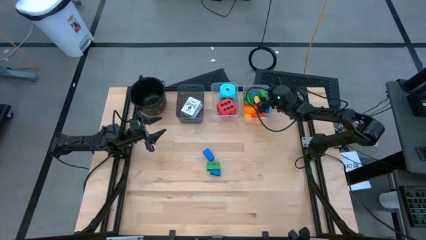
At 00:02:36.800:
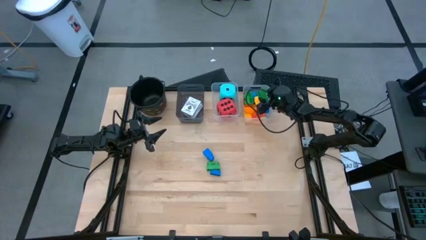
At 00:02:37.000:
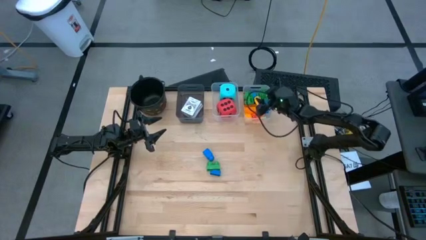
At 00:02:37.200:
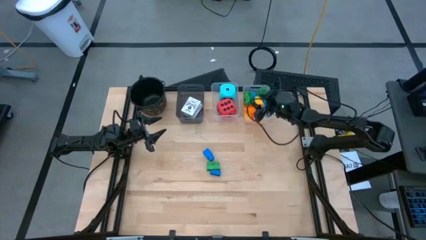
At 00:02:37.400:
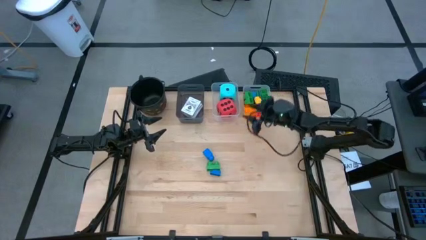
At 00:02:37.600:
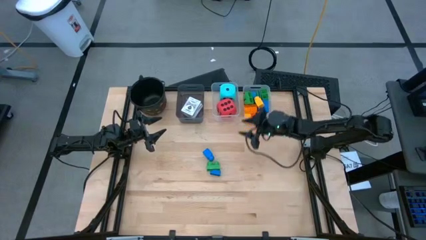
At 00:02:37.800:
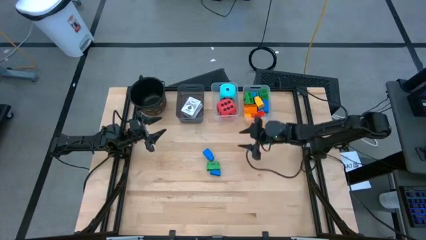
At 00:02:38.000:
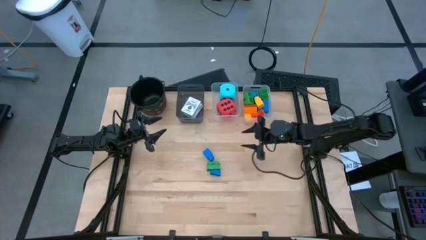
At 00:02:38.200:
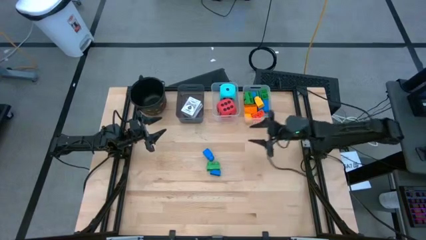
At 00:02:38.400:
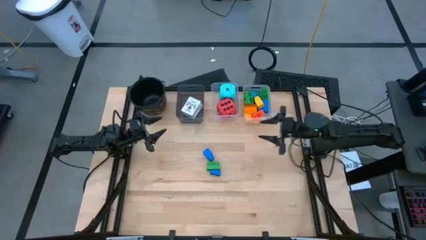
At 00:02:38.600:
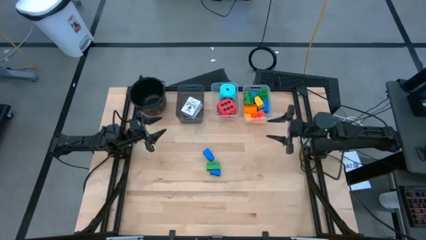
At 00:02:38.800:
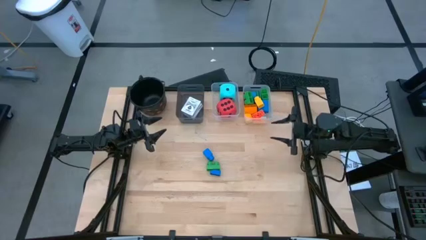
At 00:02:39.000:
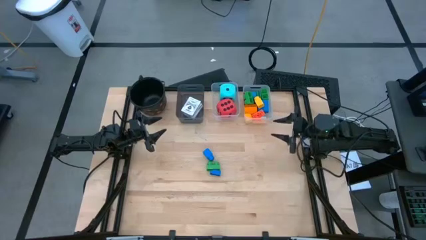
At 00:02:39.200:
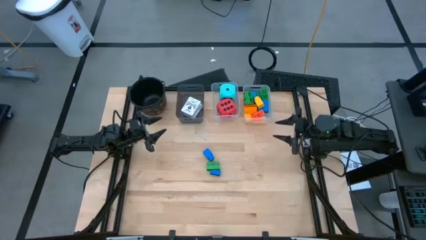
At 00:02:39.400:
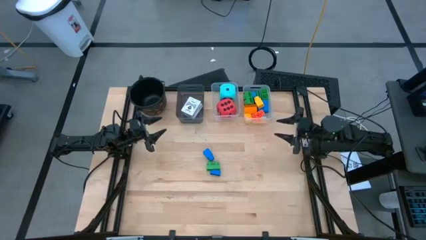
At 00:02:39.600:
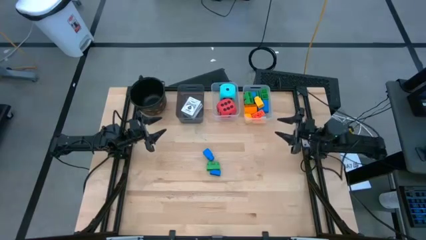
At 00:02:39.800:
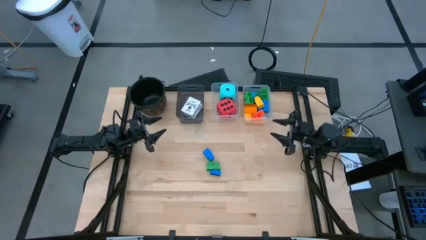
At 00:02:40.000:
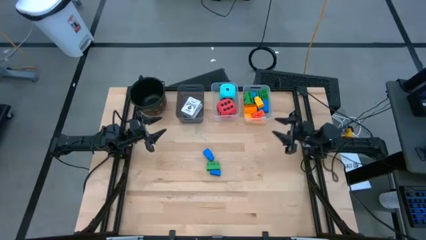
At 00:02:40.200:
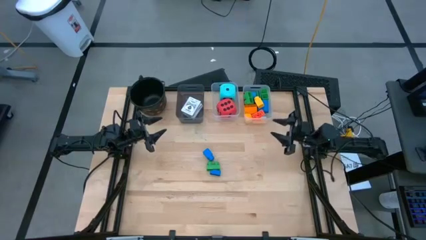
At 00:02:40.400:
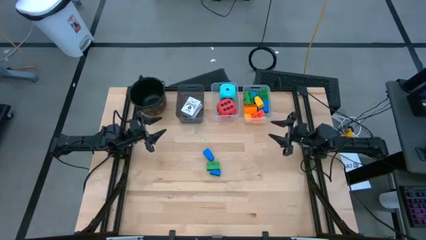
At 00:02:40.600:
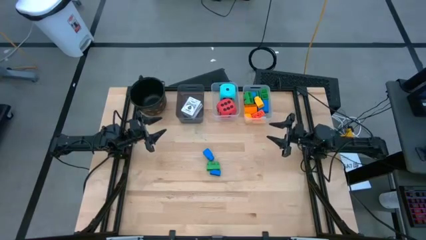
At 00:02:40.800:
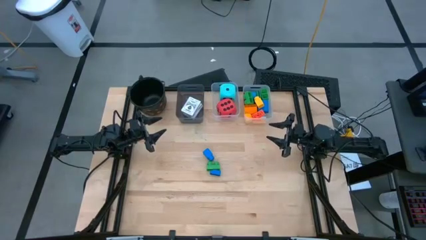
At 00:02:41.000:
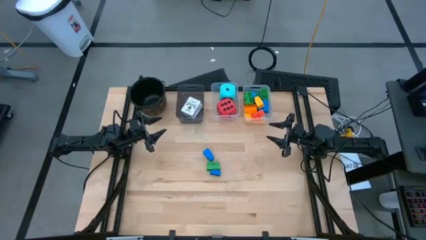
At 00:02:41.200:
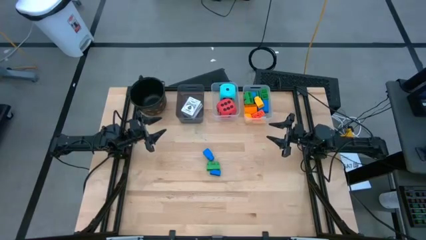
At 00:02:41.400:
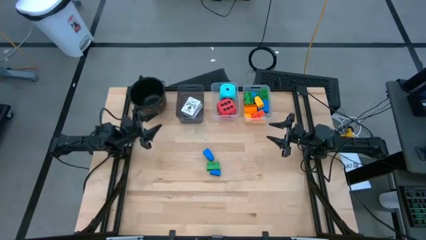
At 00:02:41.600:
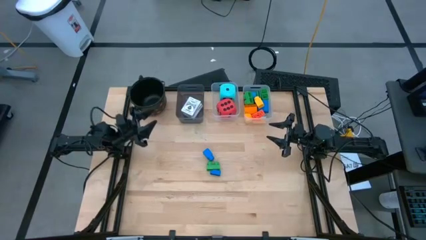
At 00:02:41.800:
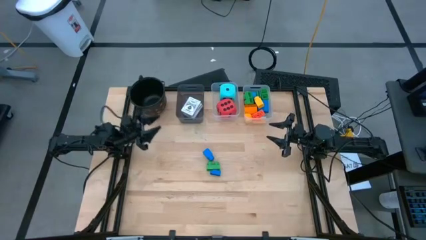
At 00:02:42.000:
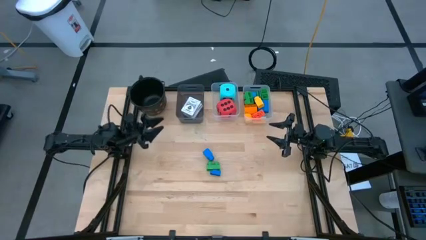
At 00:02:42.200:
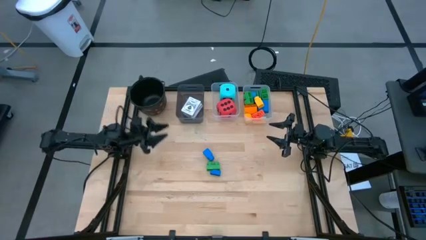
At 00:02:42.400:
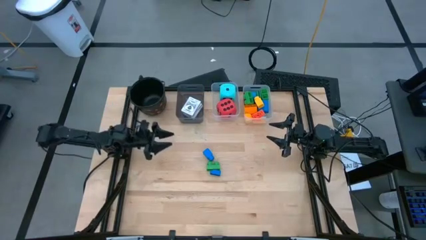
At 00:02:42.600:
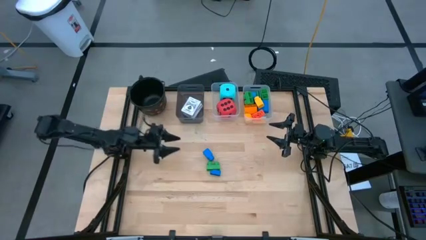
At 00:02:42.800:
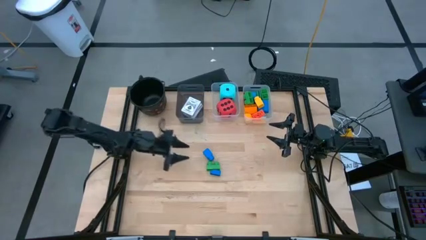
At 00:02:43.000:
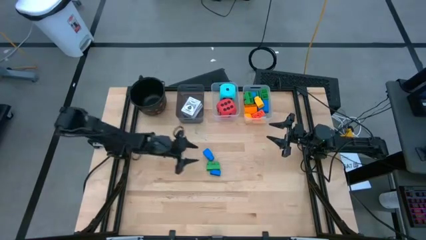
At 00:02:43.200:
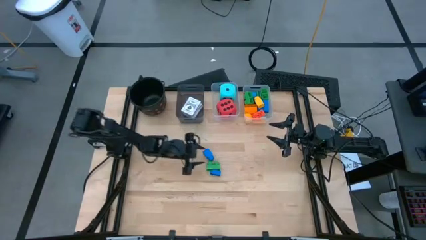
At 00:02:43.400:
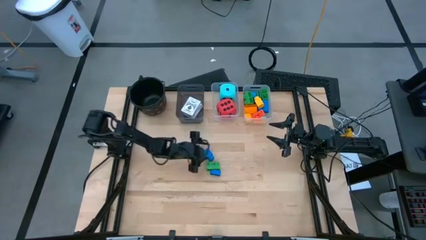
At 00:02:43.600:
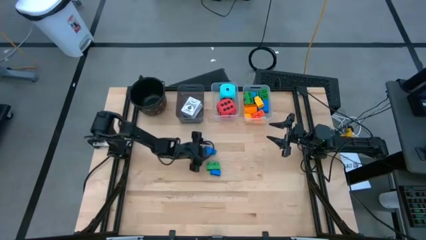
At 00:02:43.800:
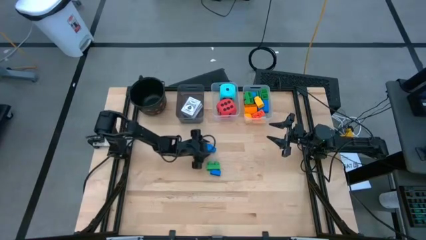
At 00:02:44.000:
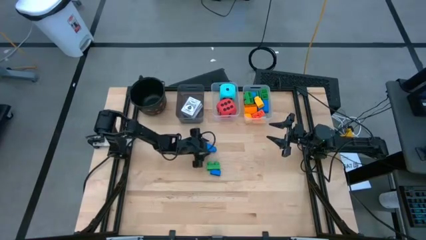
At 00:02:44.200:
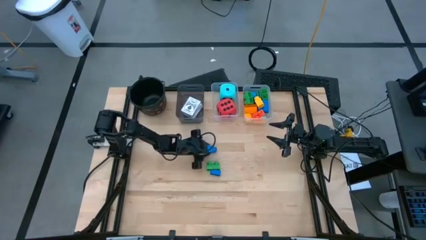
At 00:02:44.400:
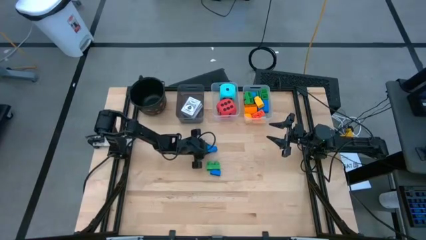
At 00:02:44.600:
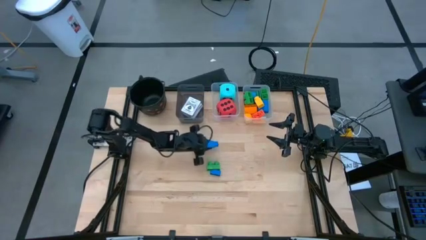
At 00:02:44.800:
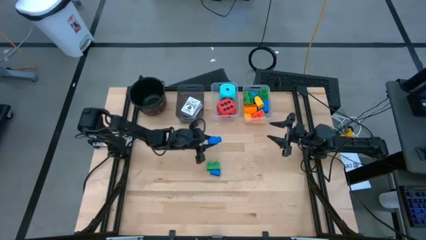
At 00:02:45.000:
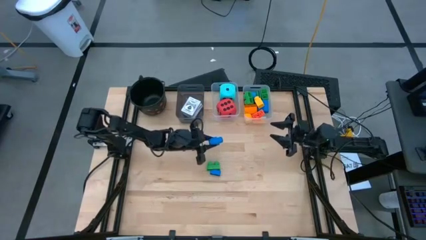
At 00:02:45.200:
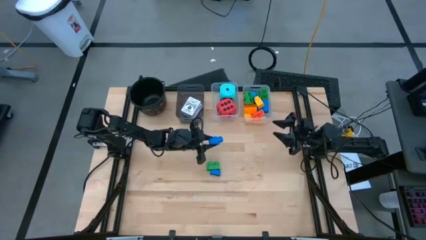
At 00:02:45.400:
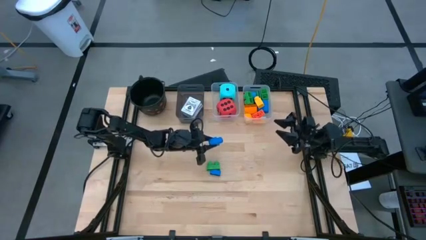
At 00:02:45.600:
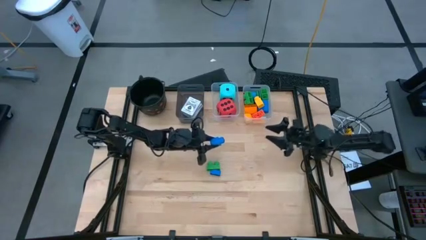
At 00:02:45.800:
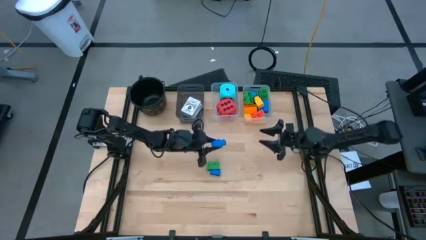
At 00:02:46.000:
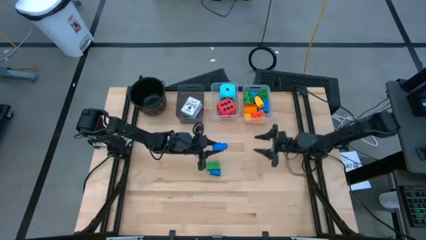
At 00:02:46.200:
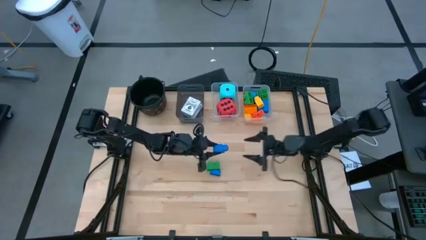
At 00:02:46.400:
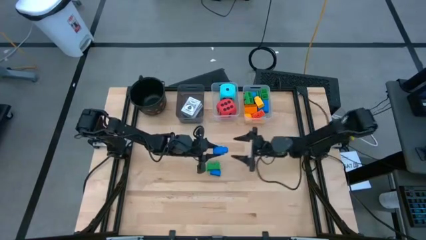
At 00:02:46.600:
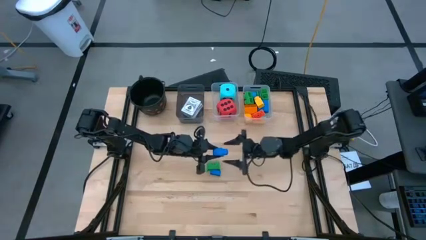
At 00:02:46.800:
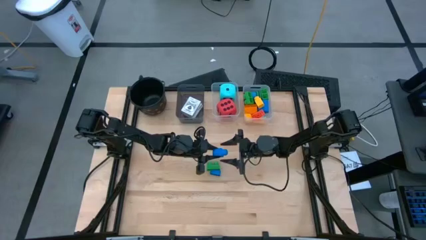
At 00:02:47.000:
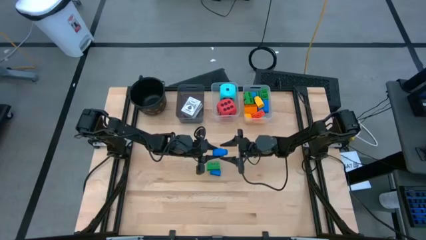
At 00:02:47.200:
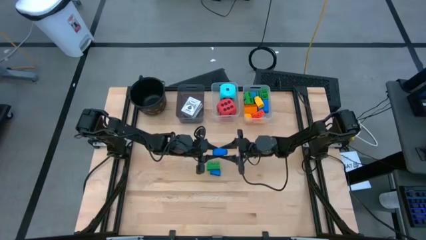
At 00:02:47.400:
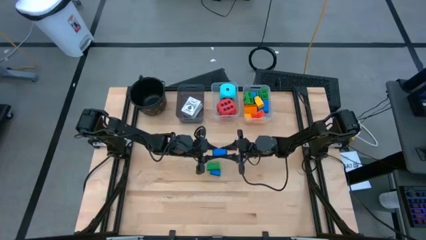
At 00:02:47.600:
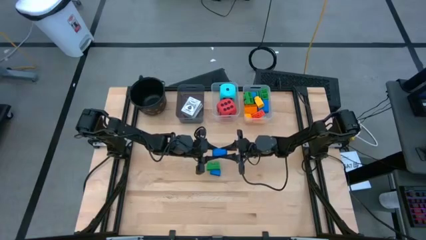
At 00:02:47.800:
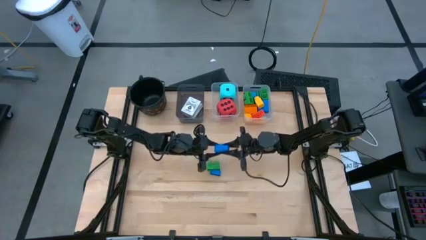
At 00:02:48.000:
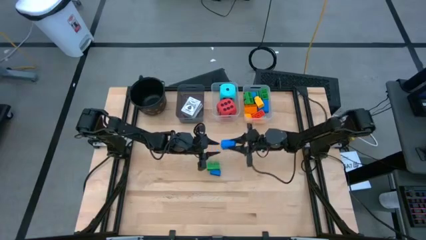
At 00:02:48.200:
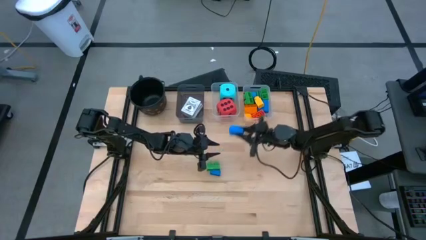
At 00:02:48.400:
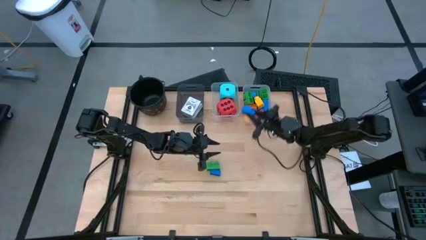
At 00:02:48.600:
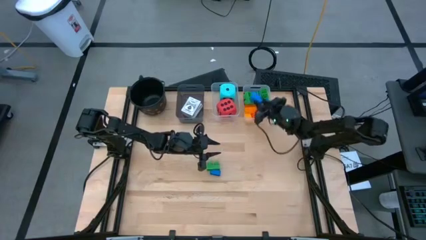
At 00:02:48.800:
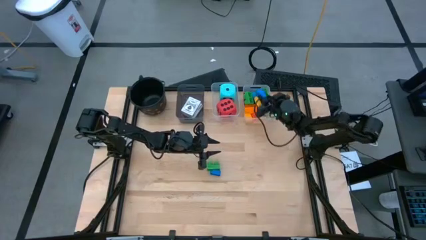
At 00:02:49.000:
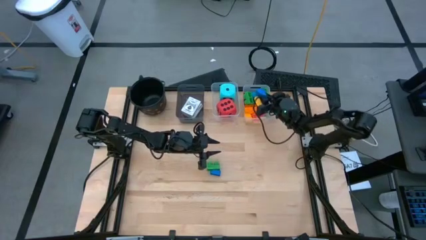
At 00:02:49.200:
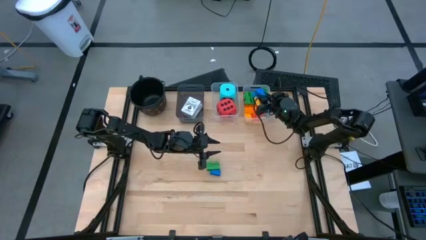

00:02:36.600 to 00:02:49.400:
Task: Pick & Place Toys
Put the blue one stud game piece into the right transparent bin
